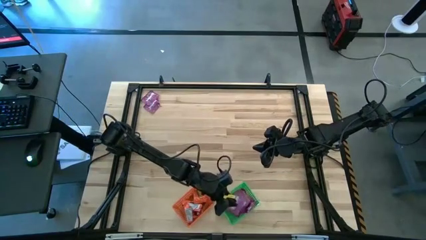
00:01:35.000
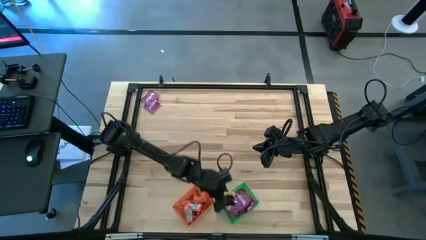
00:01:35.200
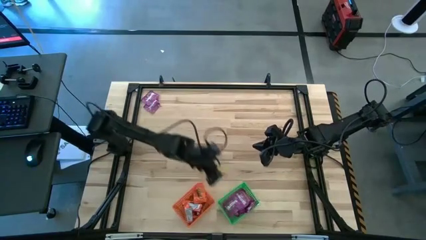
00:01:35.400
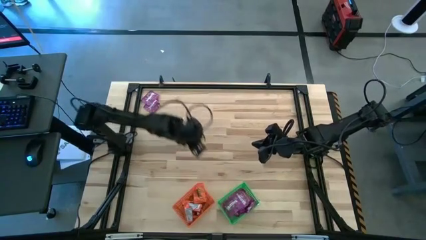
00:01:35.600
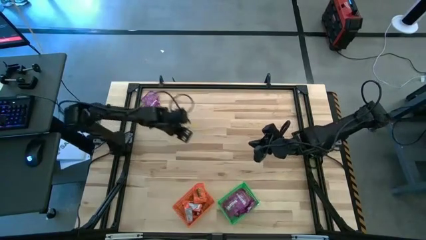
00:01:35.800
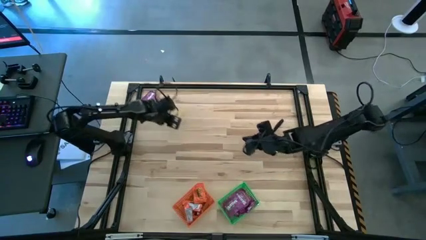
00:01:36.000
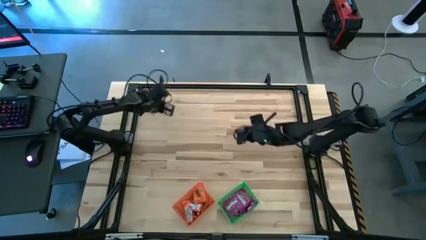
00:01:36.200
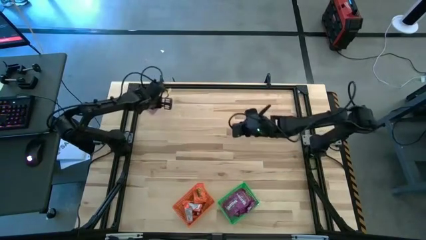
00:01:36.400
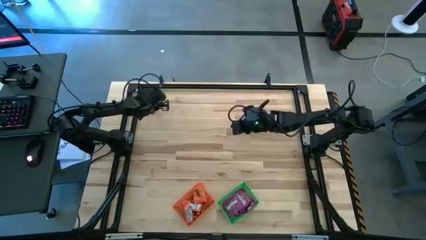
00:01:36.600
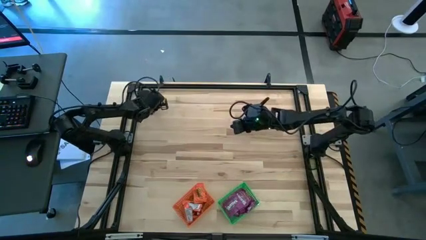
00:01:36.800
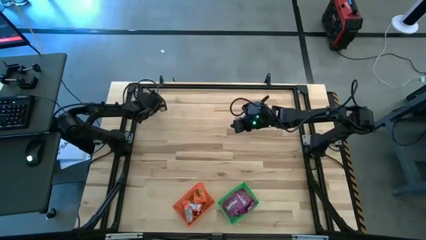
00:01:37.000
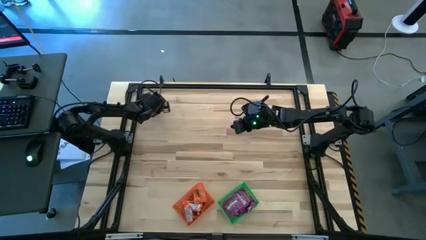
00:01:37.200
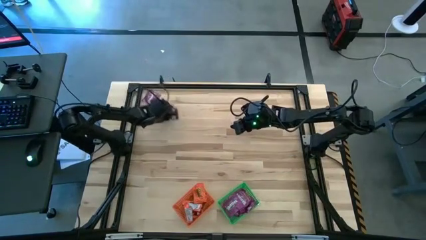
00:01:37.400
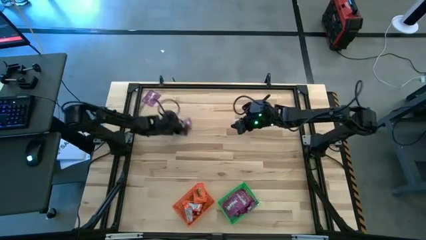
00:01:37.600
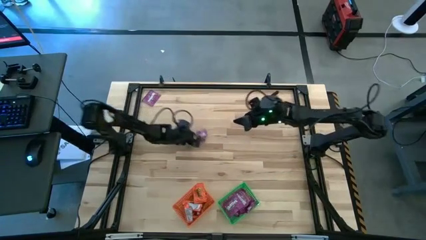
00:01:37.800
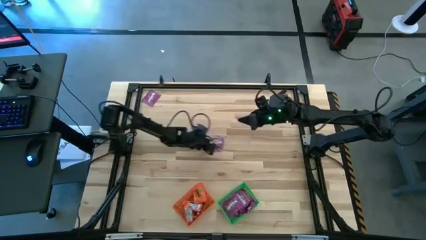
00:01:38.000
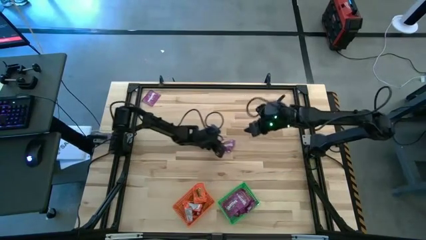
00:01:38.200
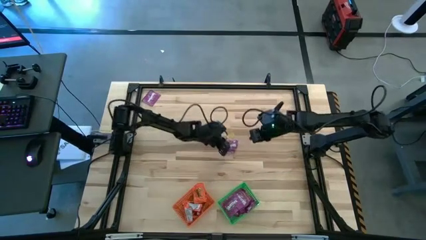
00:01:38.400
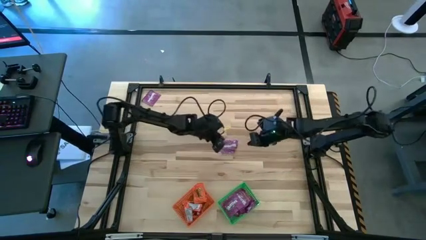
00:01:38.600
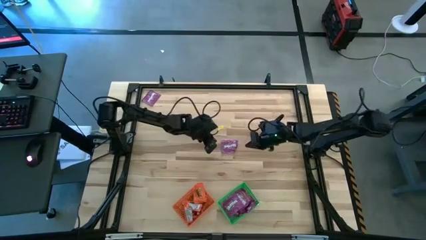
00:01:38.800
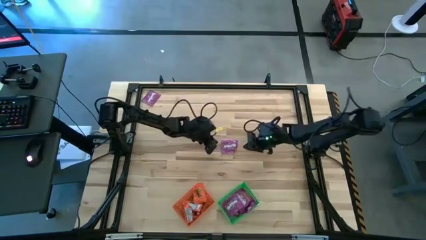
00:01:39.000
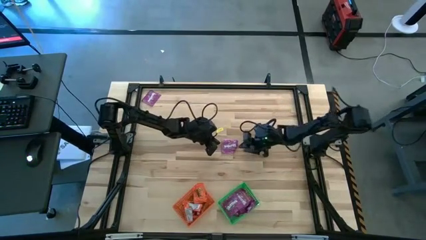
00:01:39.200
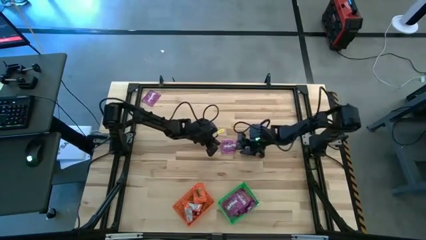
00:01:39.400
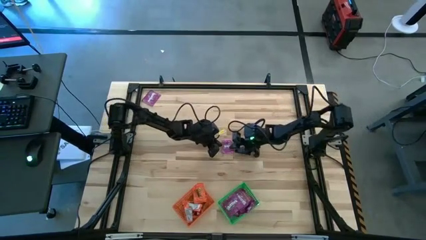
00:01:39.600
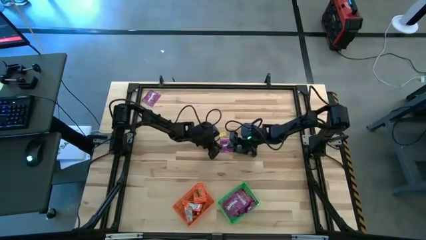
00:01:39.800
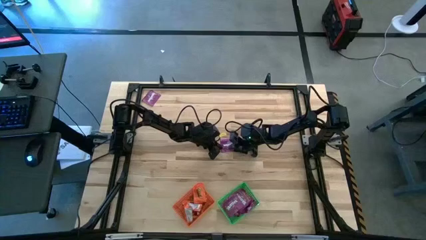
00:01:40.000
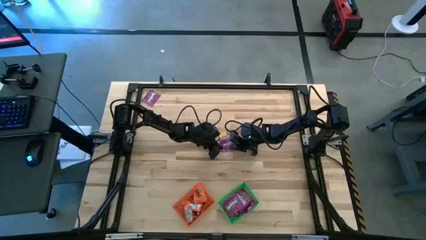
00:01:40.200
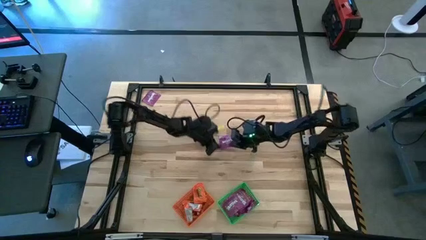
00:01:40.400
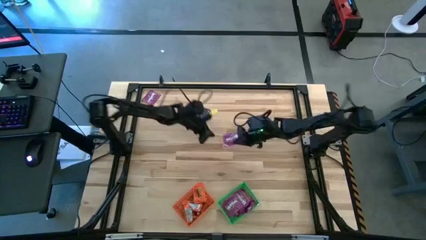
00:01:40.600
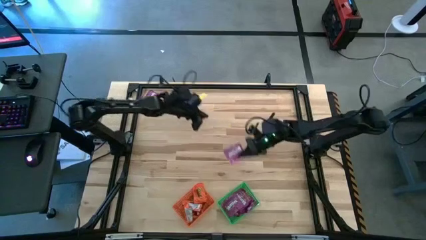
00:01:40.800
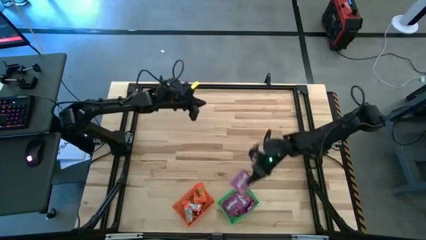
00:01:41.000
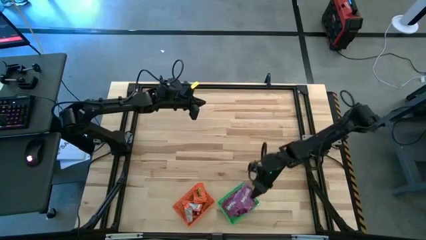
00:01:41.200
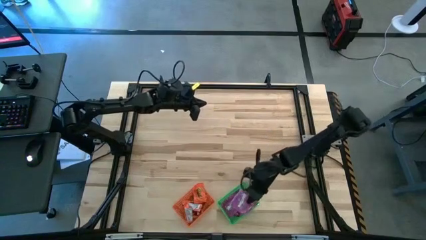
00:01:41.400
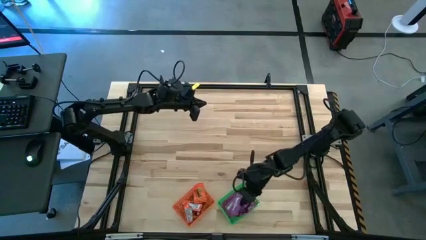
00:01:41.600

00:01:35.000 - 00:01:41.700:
Task: Sort candy by brand, put in halloween buckets
Put the purple candy into the green bin

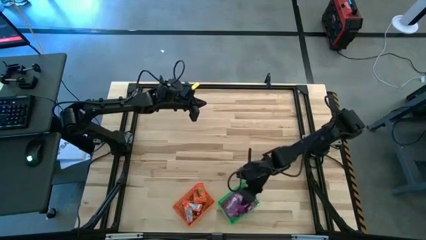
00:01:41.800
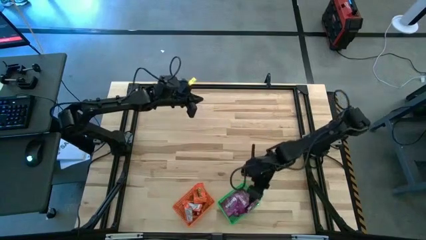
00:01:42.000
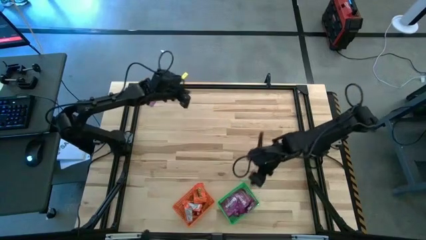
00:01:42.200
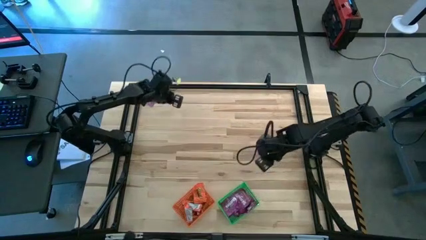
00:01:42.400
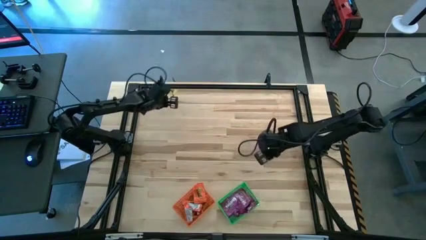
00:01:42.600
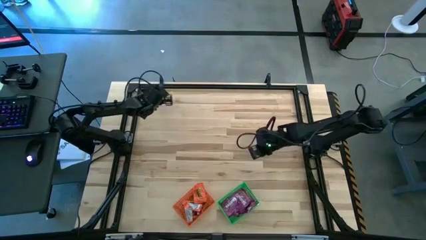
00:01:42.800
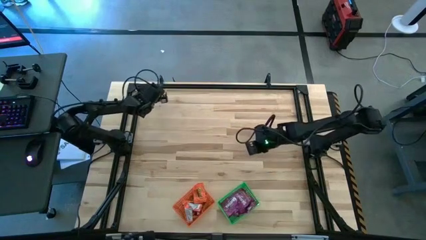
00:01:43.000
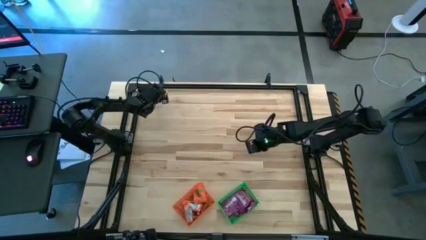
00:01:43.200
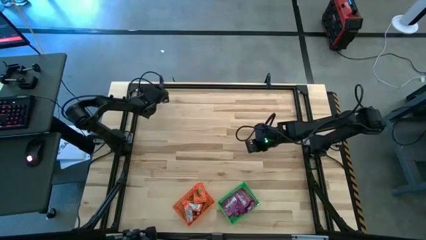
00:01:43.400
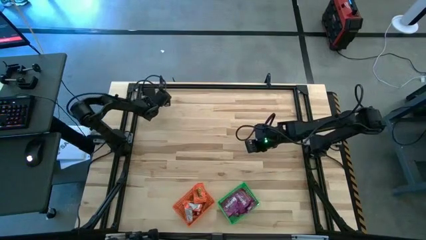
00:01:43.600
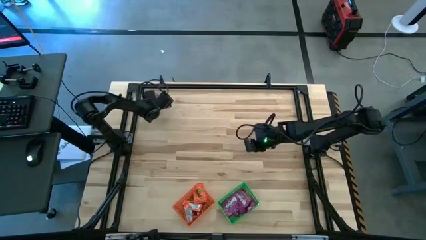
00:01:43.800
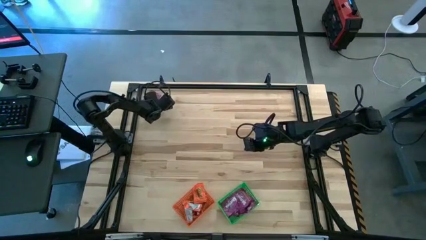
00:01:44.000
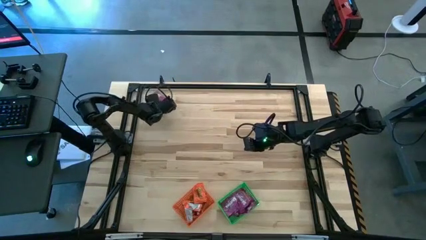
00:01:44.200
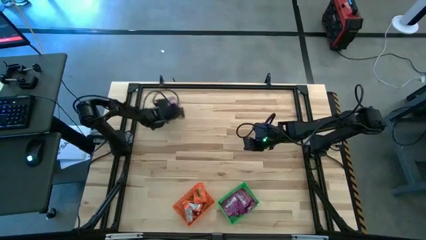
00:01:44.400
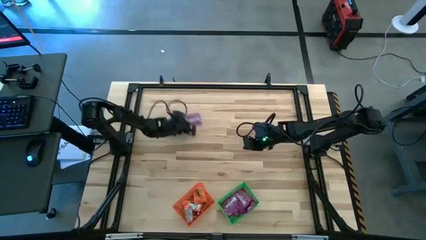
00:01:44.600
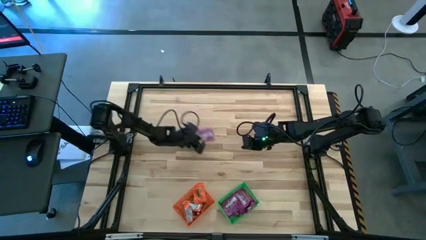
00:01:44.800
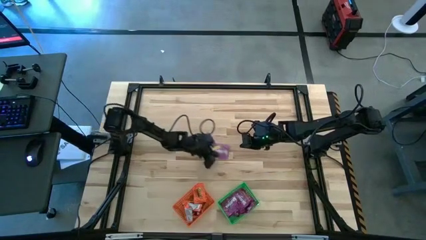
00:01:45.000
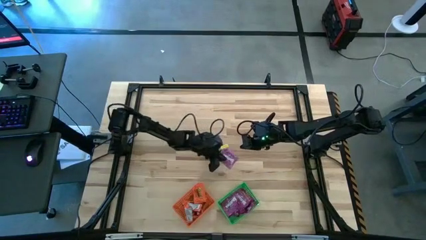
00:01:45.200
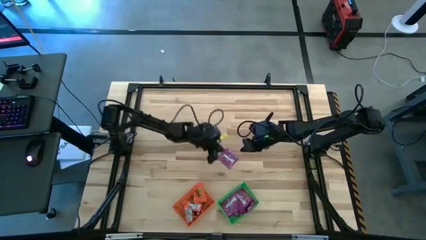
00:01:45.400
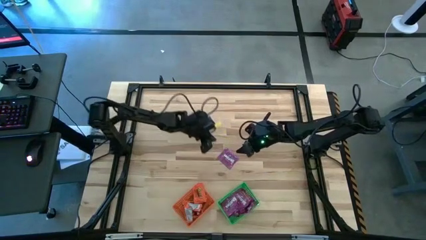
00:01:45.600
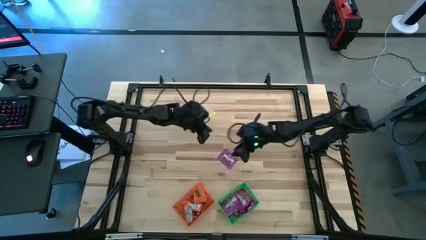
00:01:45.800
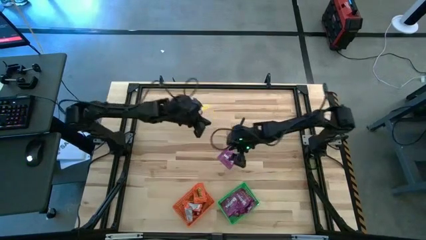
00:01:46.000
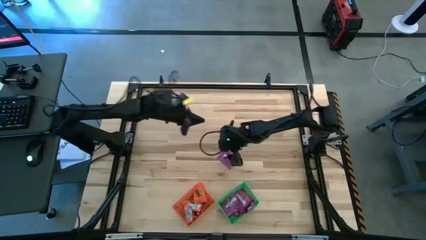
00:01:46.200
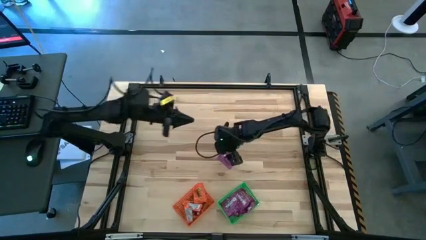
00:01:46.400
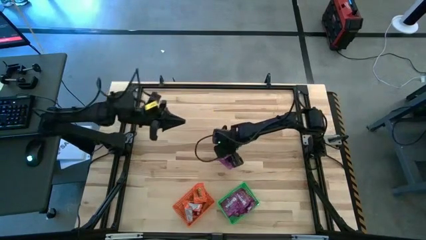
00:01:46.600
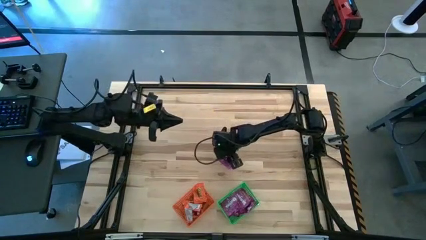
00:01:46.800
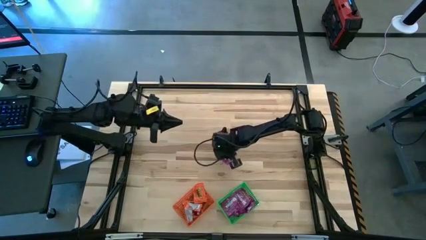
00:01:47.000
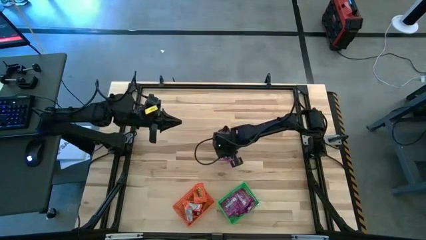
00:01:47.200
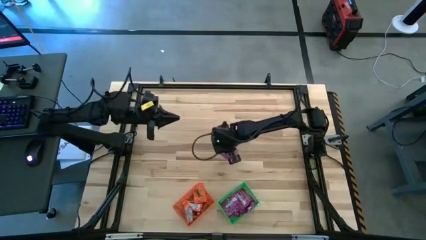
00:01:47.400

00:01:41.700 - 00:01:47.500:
Put the purple candy into the green bin

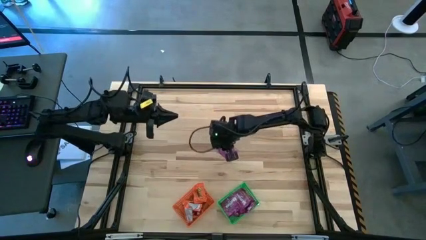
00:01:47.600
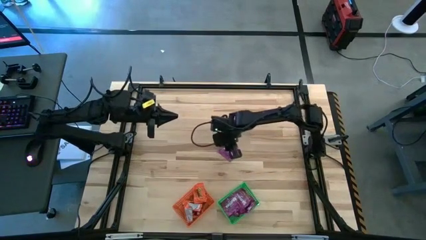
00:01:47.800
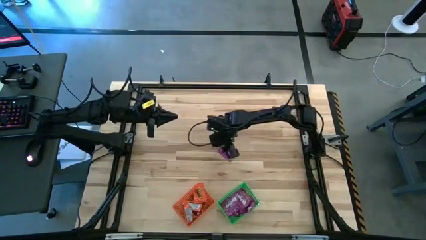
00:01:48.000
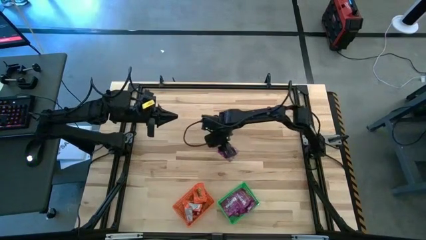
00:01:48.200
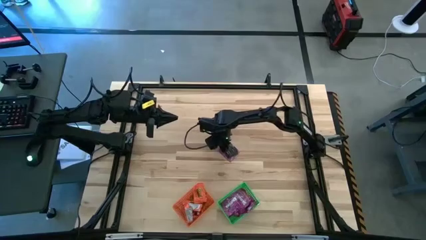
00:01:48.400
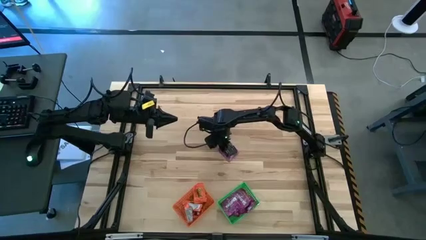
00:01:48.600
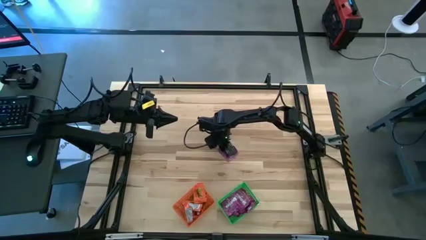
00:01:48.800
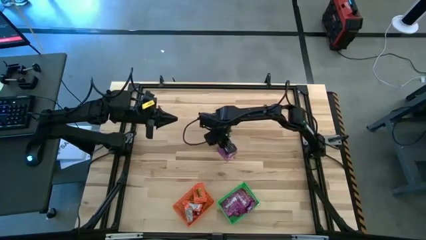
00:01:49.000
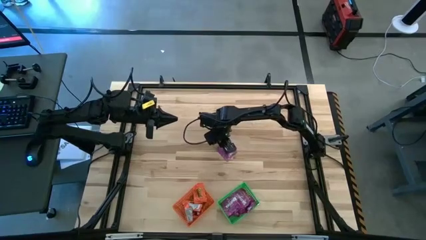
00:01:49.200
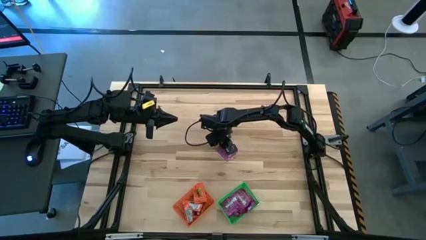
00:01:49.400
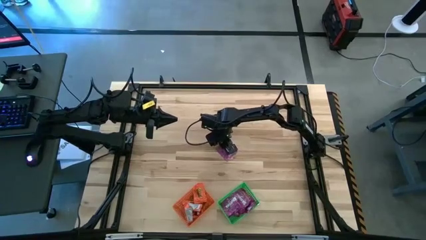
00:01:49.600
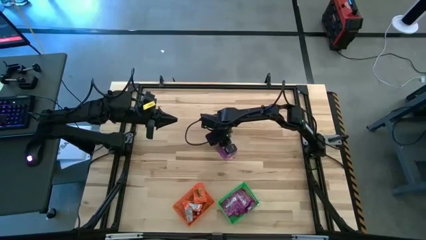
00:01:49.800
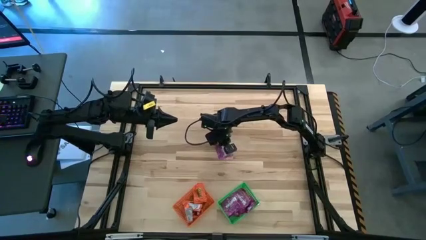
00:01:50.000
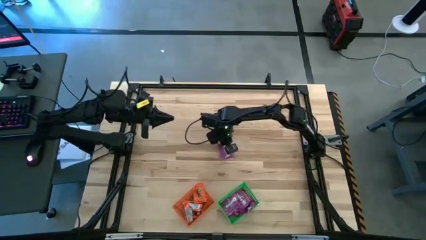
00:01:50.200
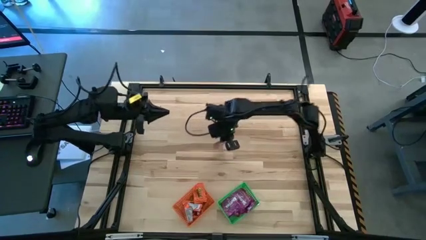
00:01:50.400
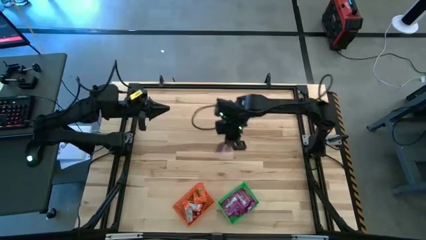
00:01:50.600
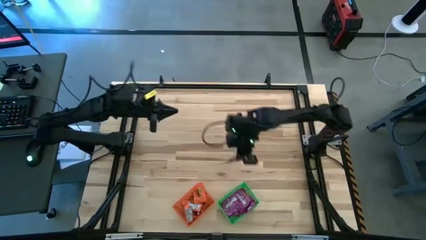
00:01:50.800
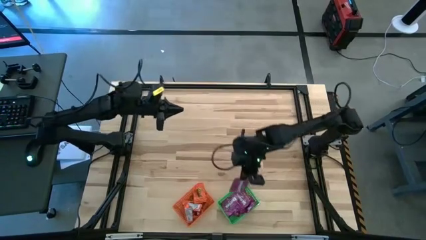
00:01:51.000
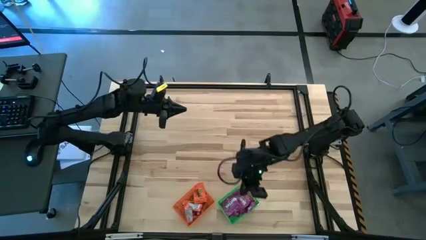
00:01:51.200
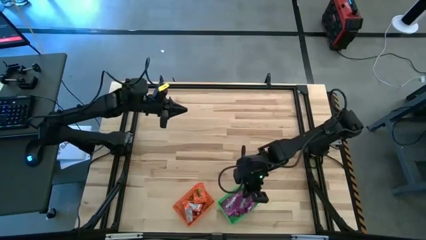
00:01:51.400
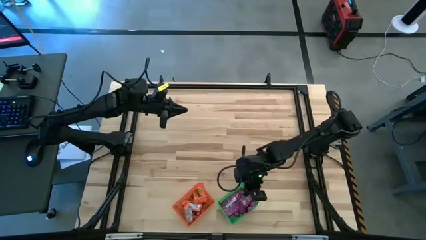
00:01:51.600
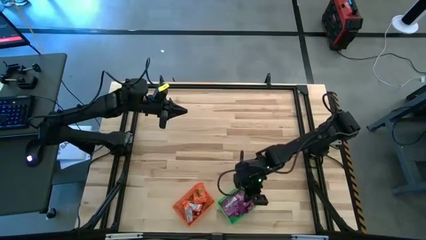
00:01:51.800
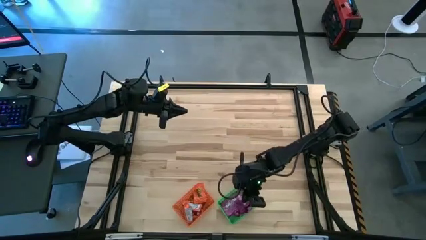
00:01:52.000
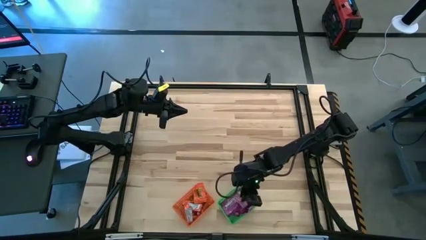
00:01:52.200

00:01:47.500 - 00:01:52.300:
Put the purple candy into the green bin
